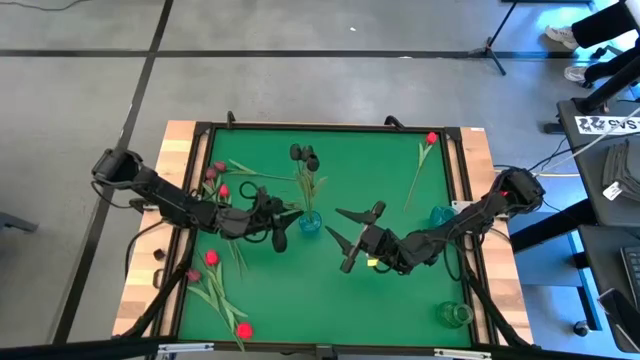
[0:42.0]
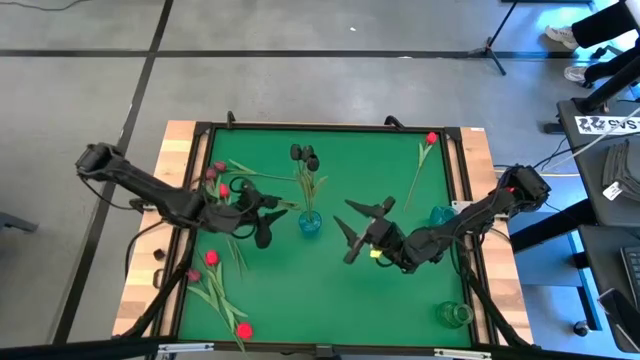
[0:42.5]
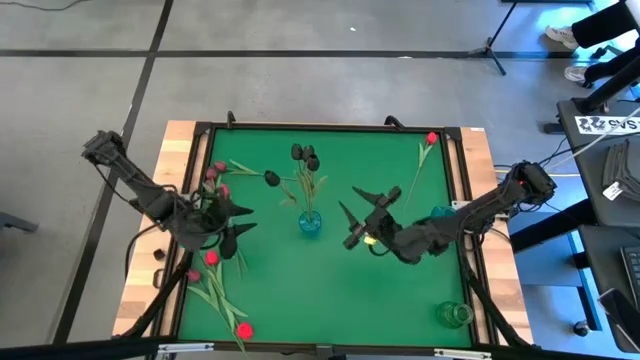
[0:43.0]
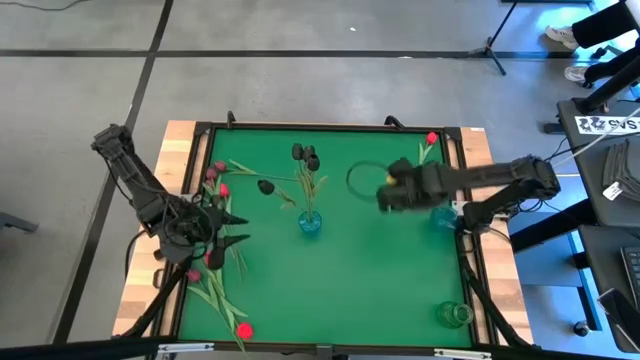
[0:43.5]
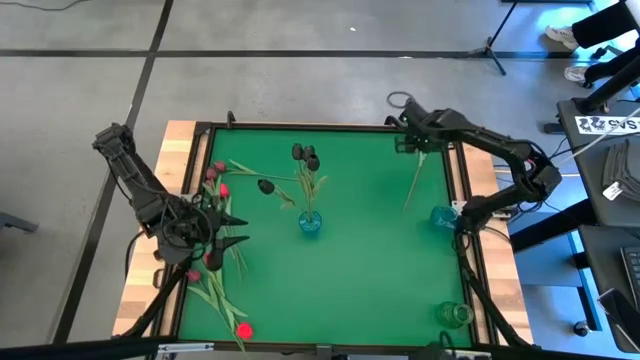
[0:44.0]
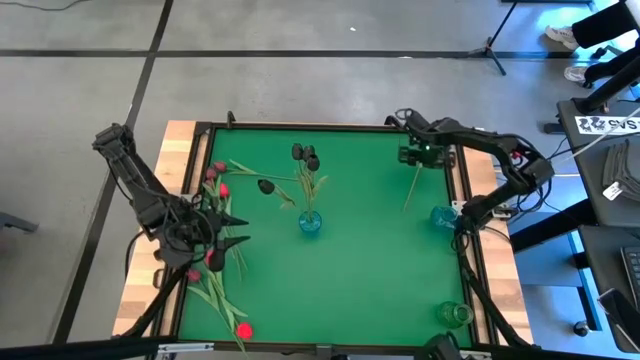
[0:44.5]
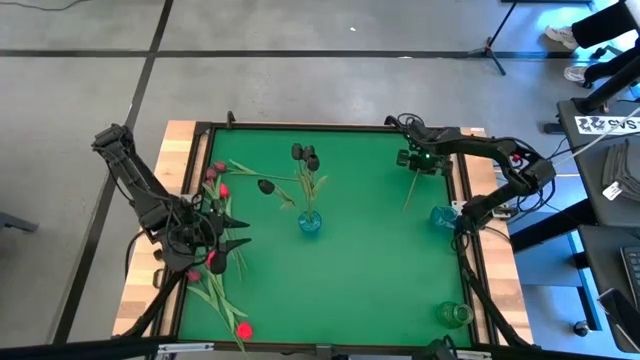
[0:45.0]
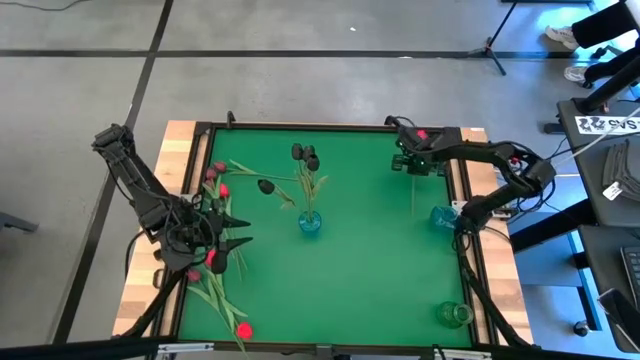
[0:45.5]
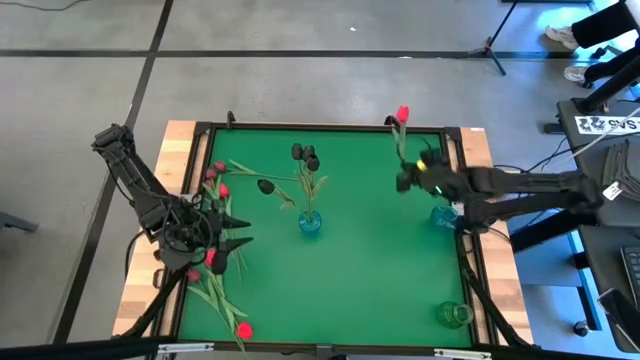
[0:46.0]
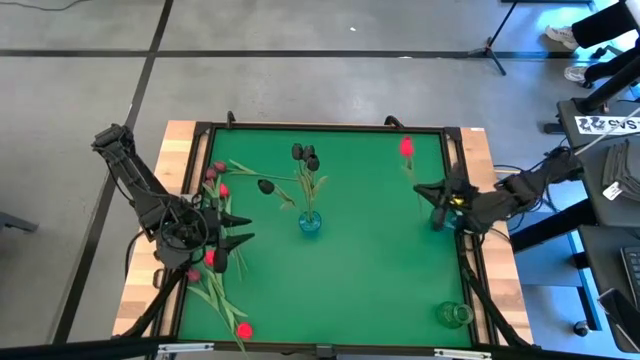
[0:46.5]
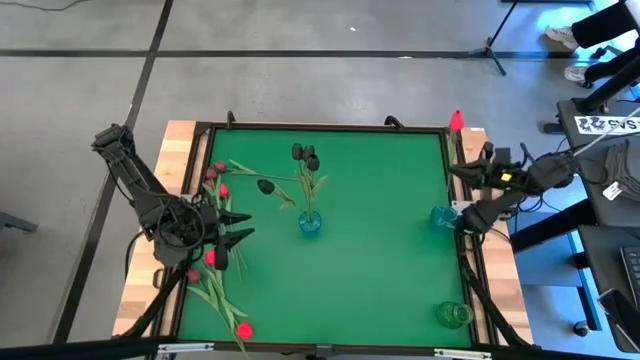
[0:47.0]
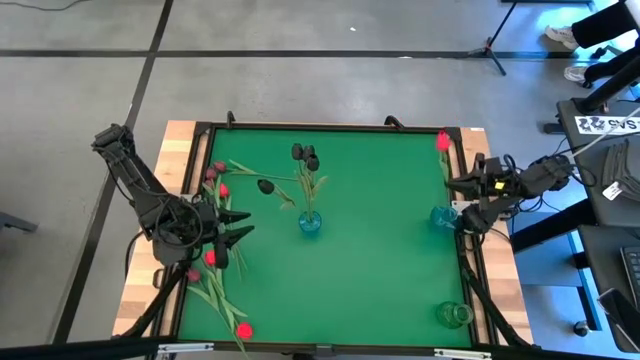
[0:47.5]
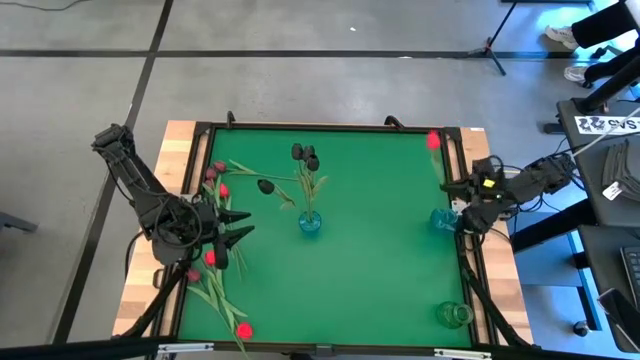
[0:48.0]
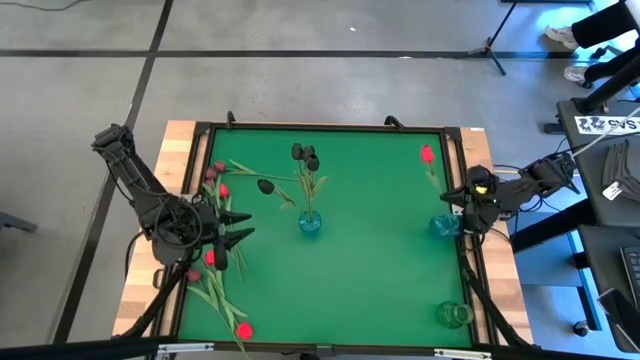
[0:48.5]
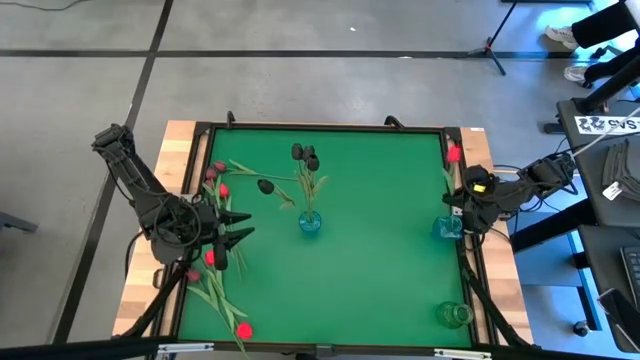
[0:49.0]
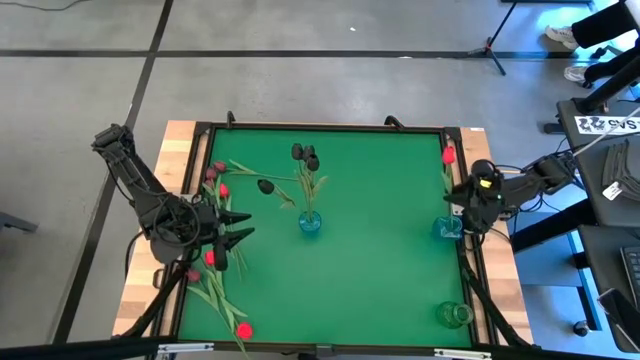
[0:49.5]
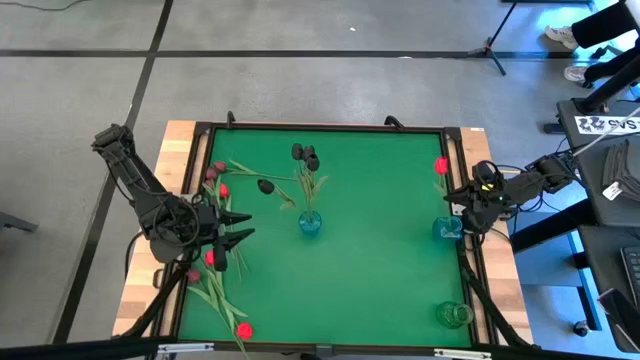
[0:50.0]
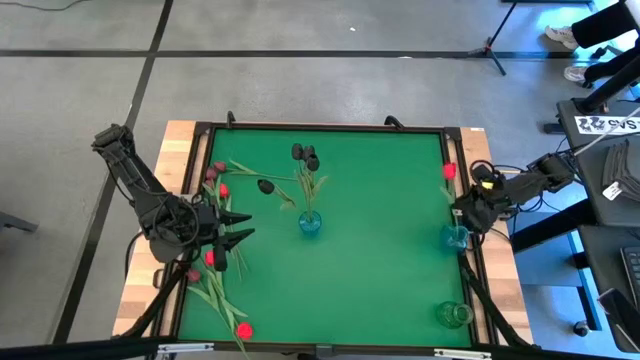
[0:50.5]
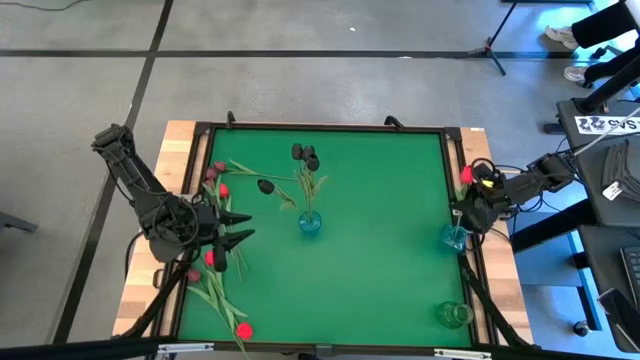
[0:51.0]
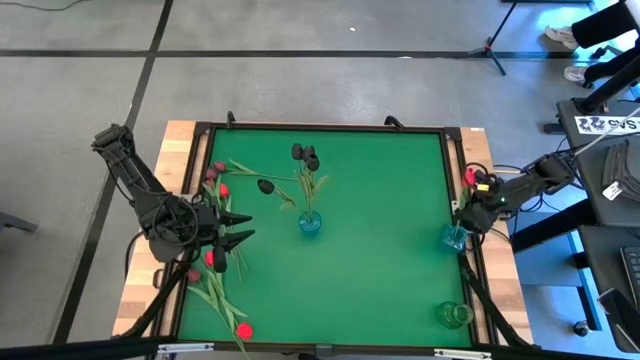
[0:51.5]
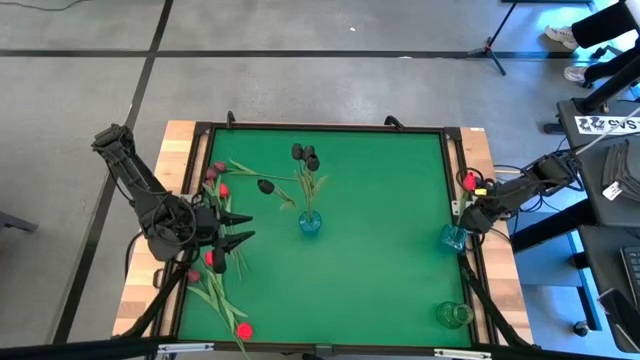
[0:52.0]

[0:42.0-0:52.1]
Task: Sort flowers into vase by color
Put the red flower into the right blue vase

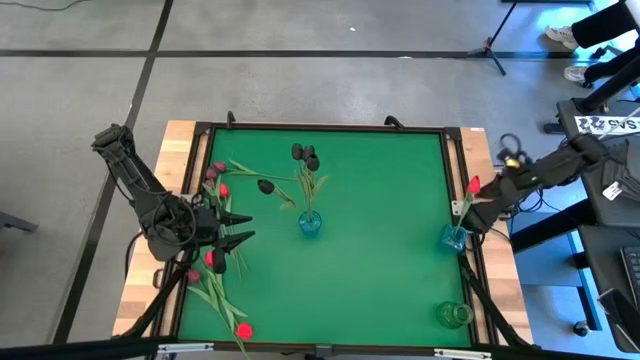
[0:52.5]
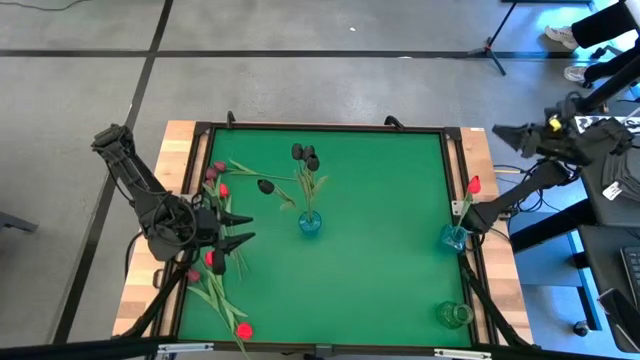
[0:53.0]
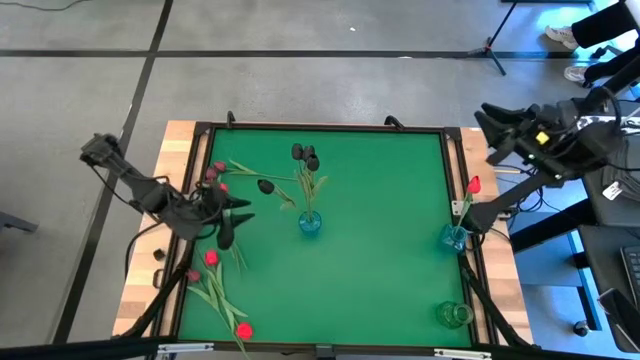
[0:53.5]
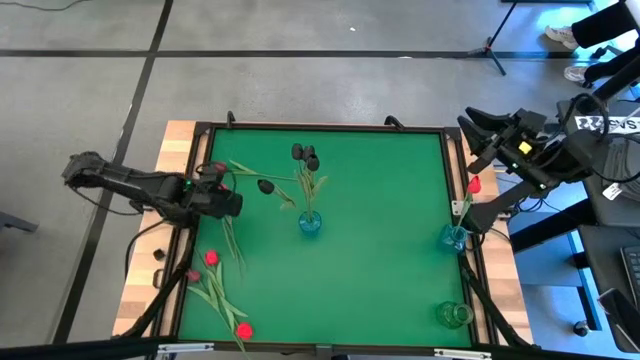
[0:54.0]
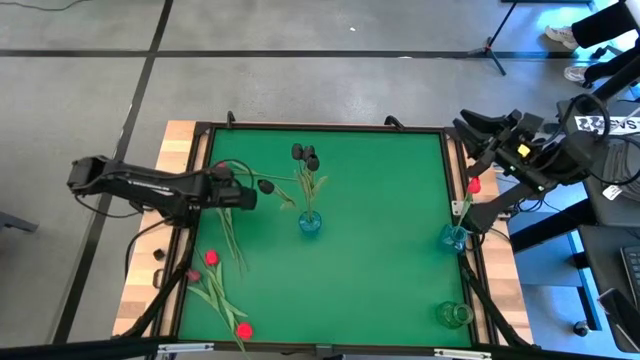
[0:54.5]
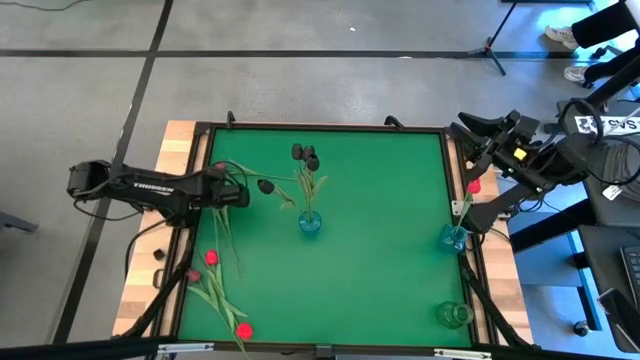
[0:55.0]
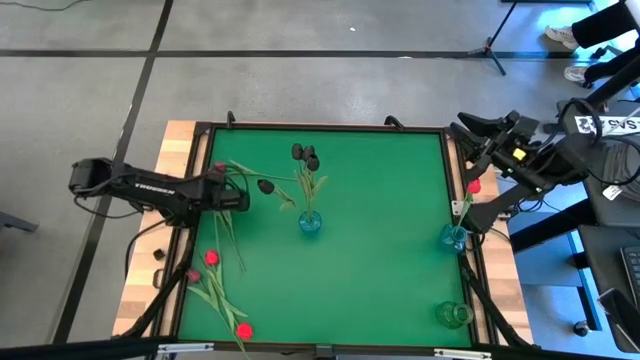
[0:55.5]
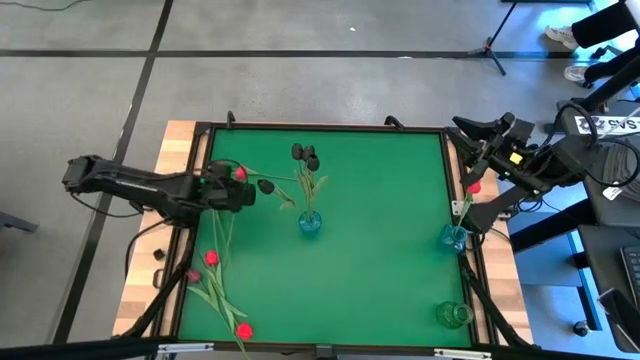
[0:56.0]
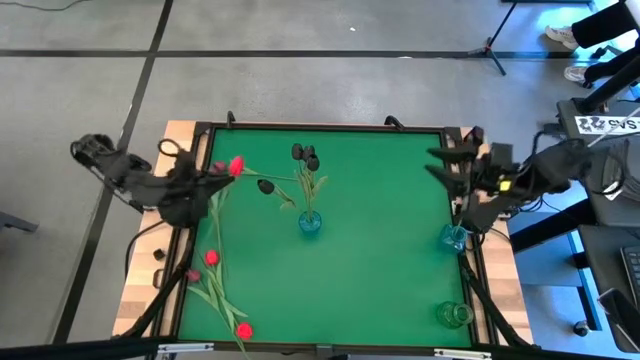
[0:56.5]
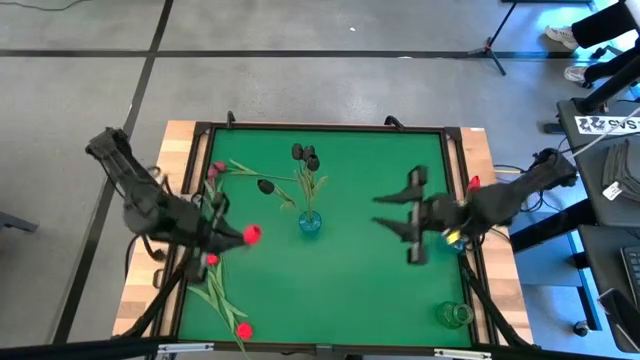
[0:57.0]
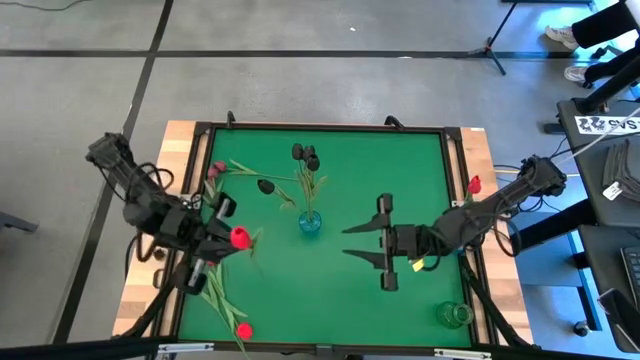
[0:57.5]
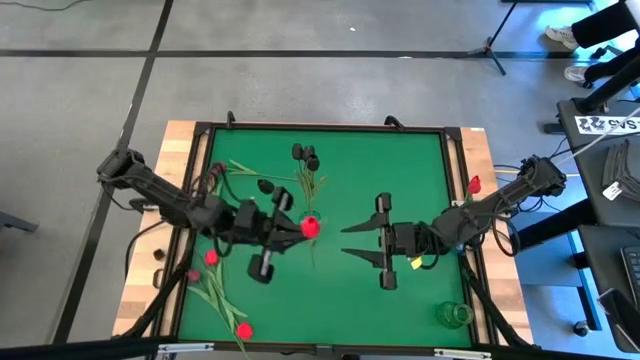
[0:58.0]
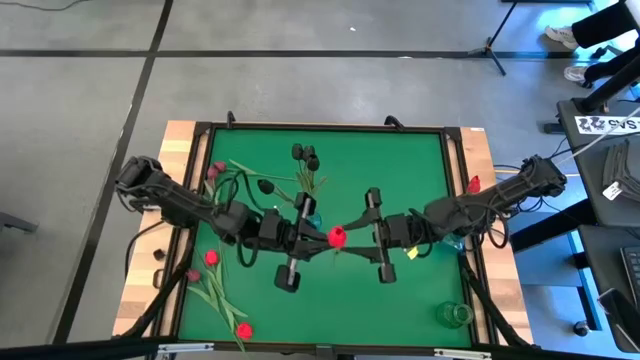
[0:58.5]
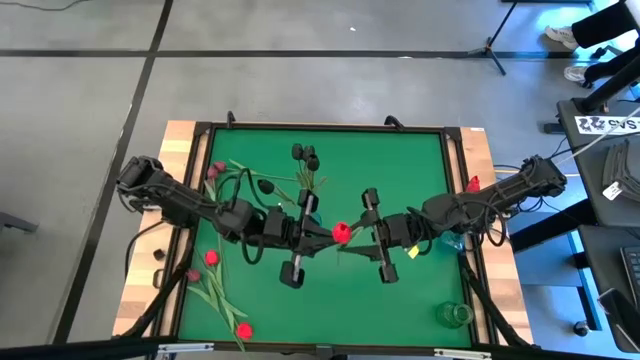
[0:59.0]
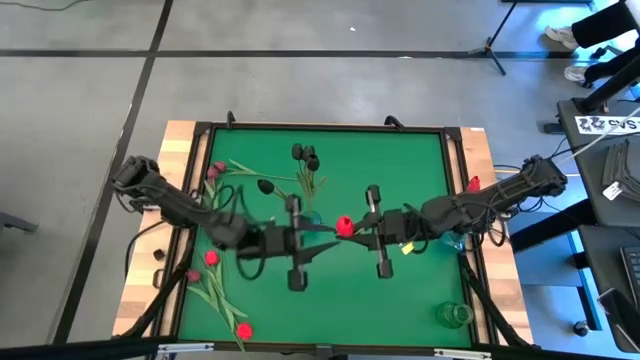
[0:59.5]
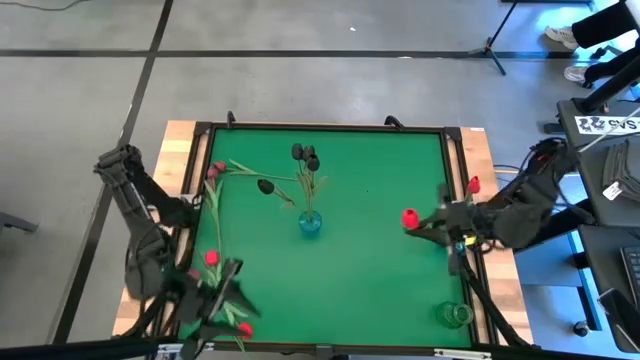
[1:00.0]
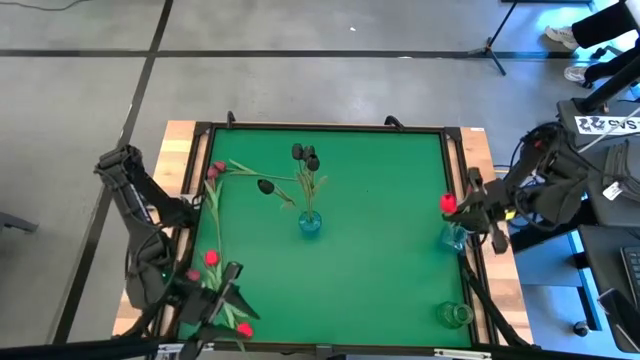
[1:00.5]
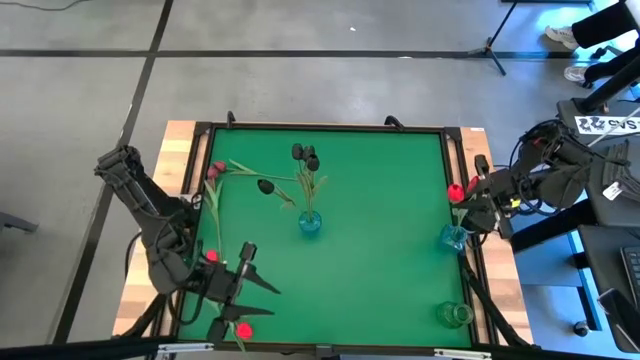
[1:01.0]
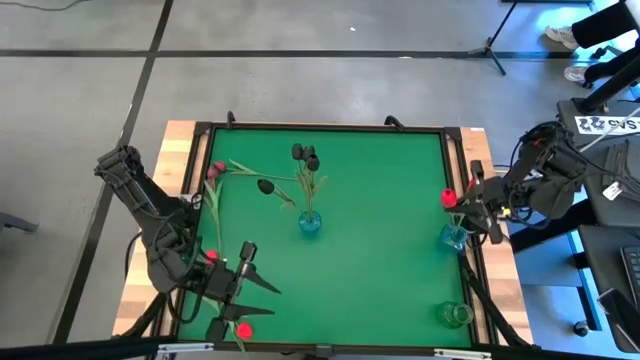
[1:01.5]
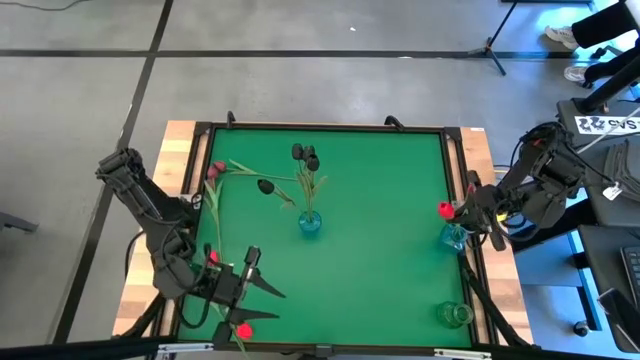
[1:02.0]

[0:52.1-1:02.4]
Put the red flower into the right blue vase
